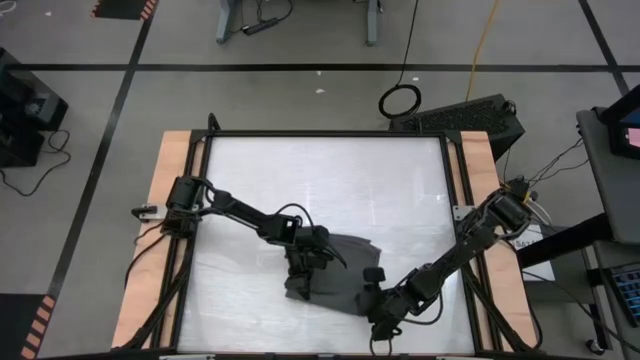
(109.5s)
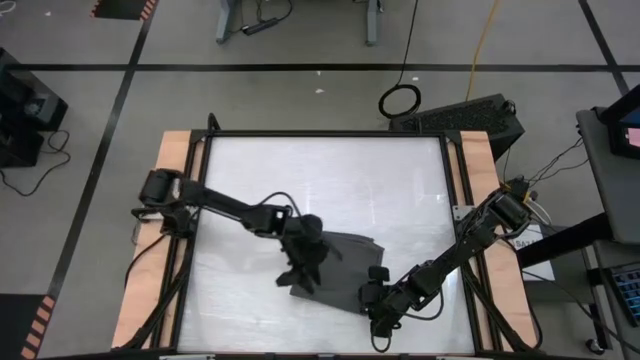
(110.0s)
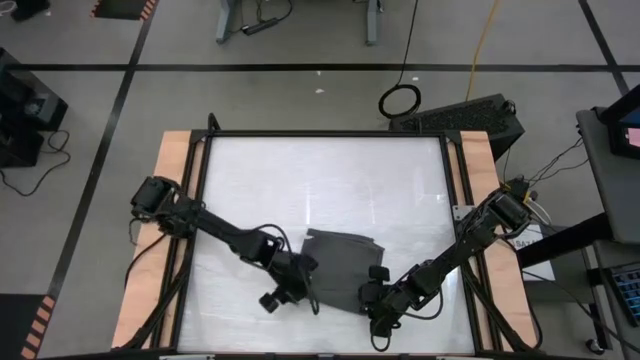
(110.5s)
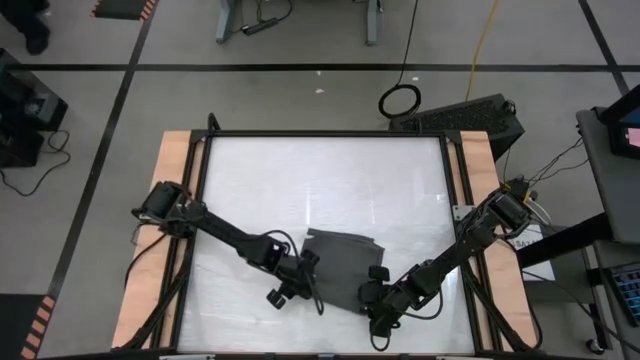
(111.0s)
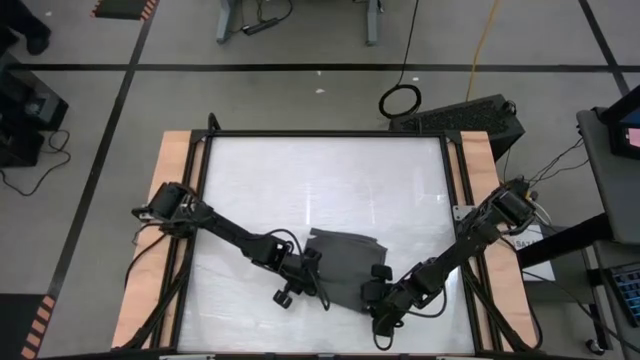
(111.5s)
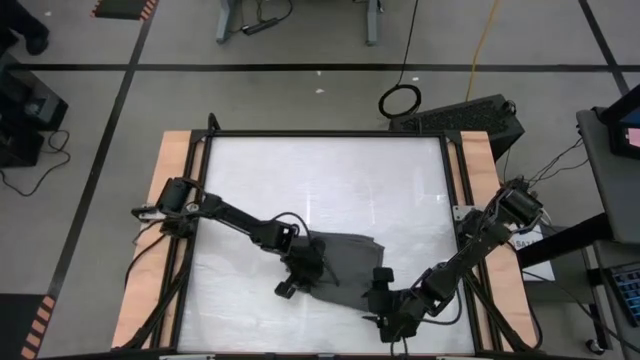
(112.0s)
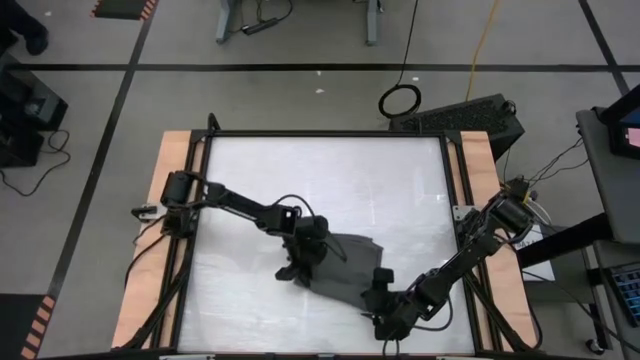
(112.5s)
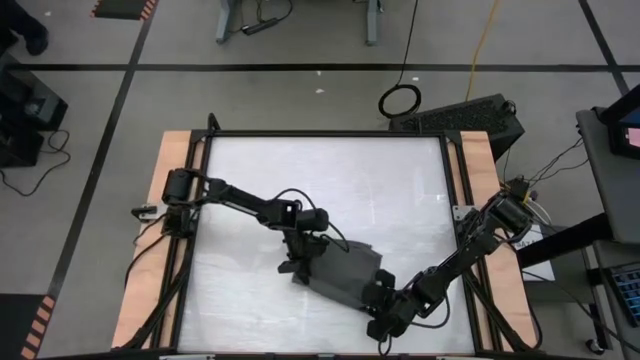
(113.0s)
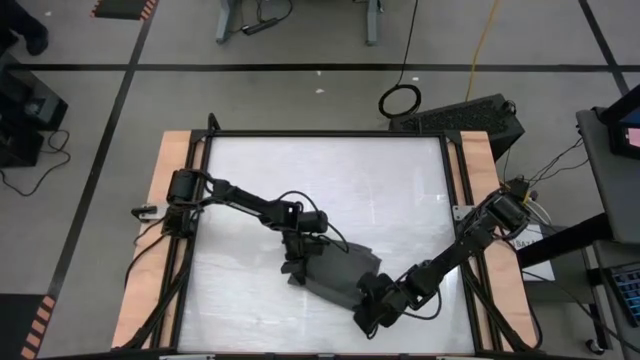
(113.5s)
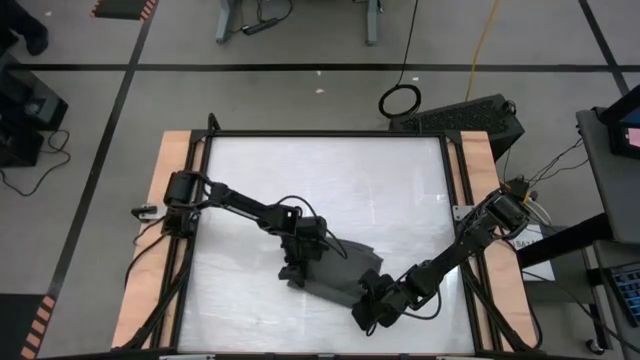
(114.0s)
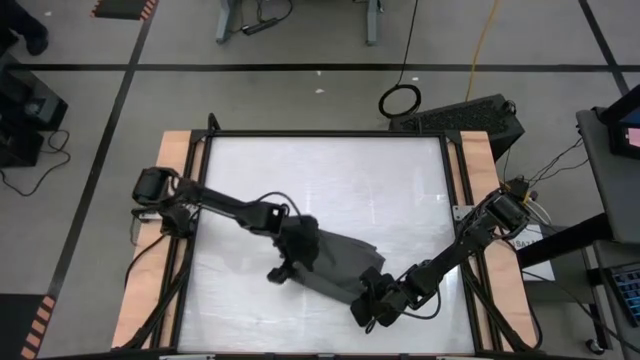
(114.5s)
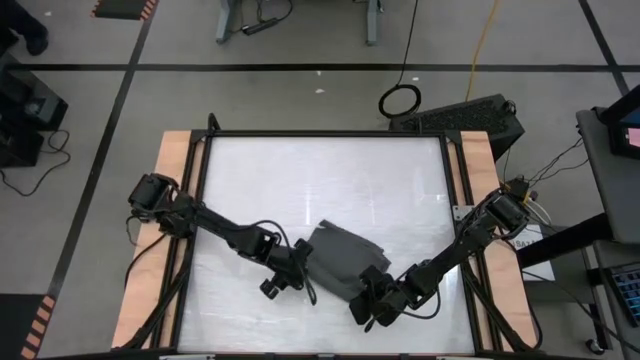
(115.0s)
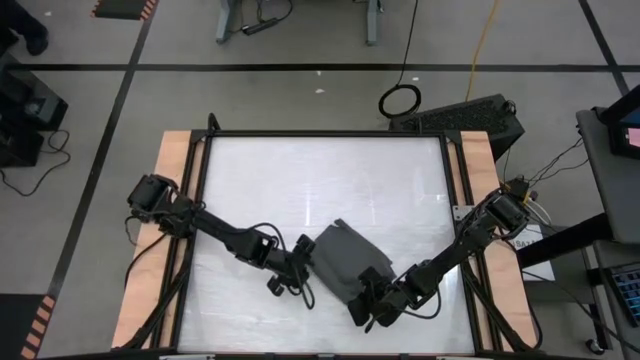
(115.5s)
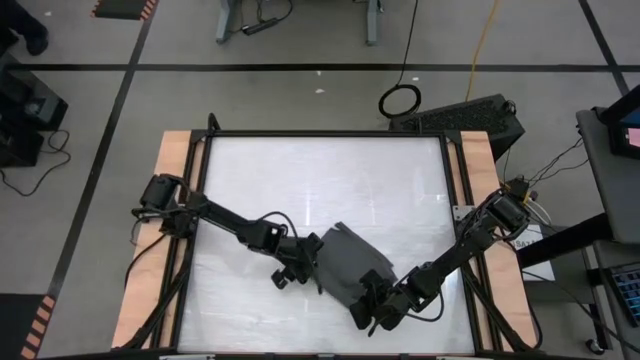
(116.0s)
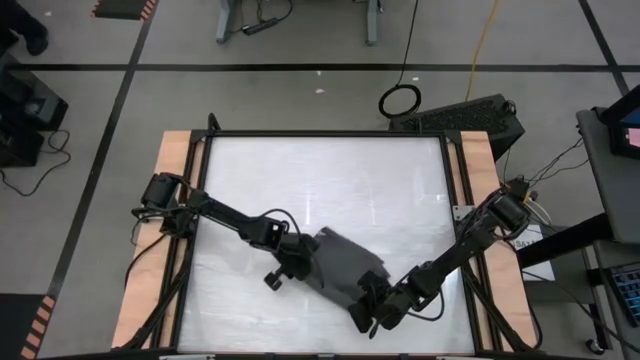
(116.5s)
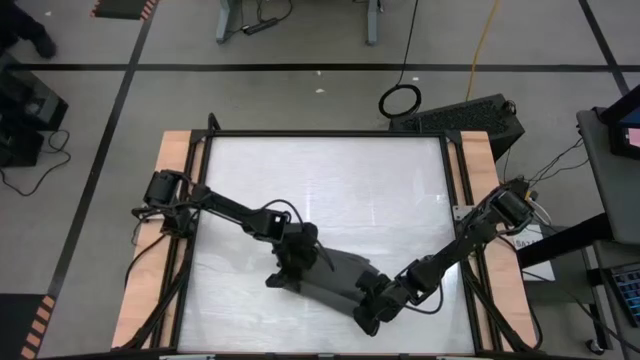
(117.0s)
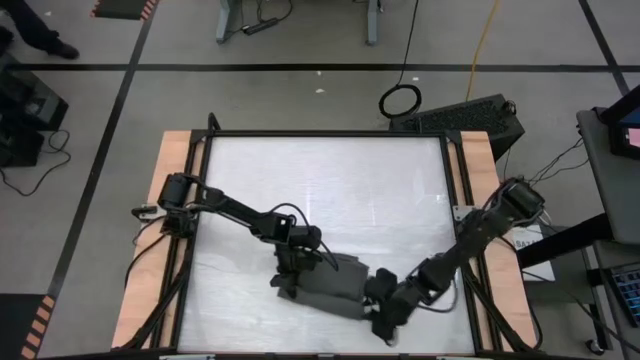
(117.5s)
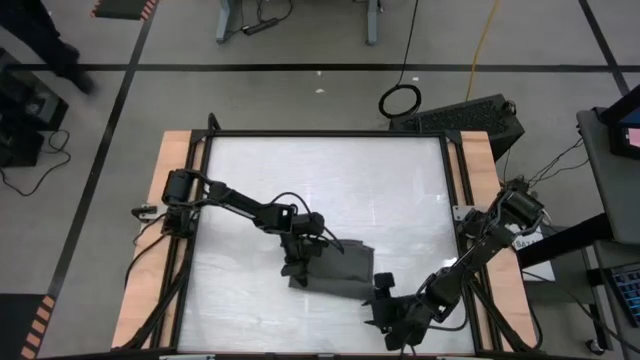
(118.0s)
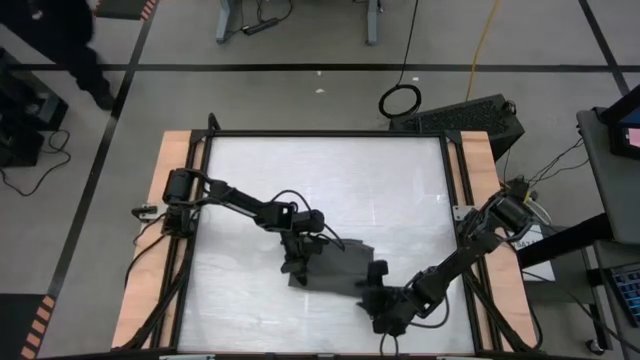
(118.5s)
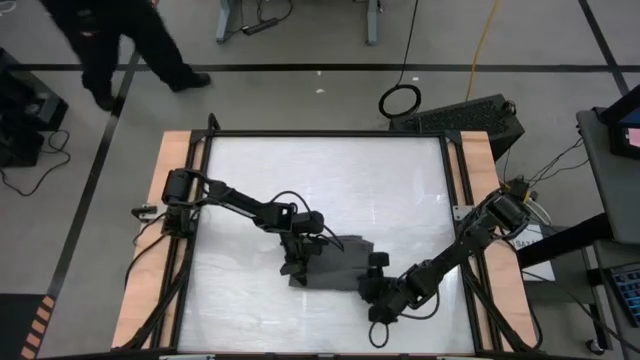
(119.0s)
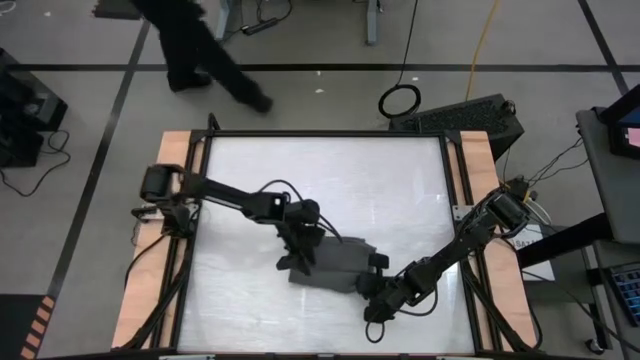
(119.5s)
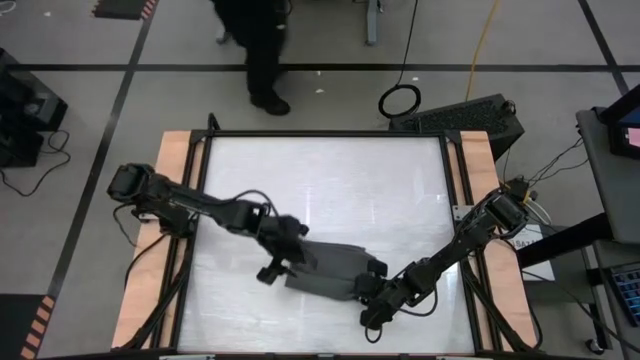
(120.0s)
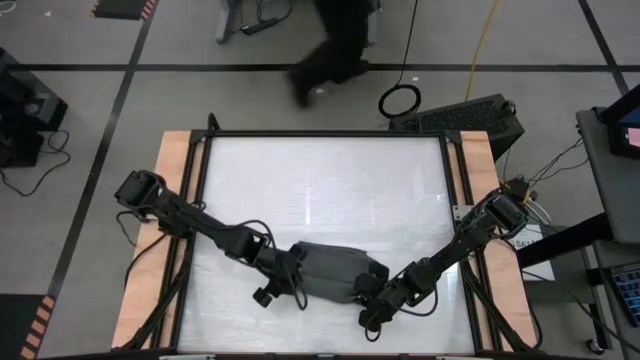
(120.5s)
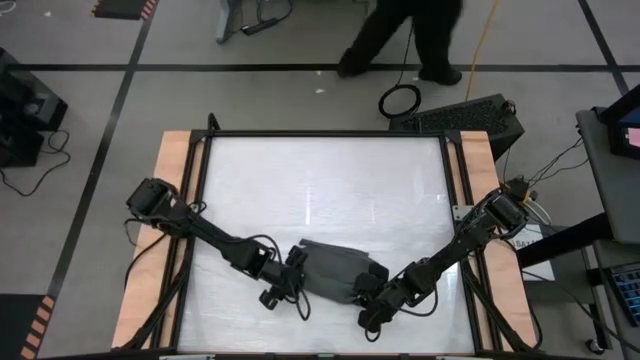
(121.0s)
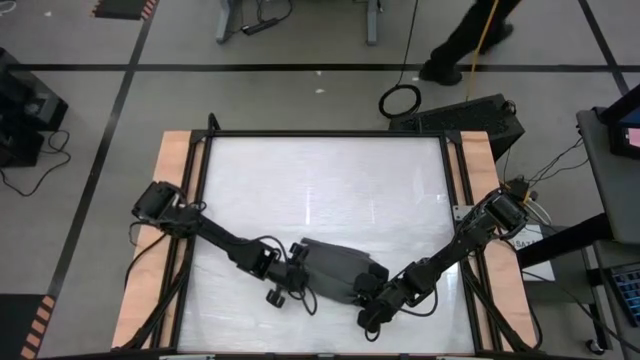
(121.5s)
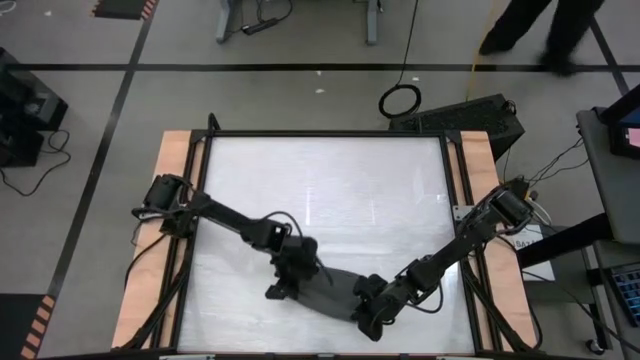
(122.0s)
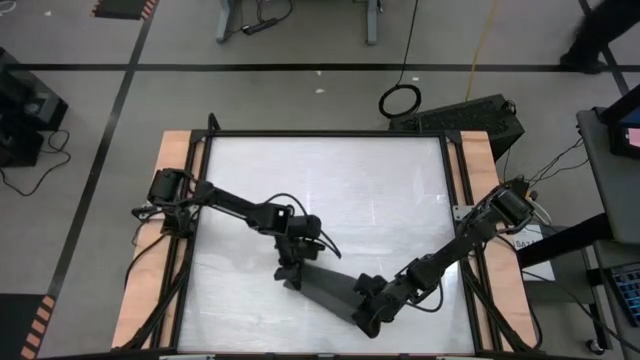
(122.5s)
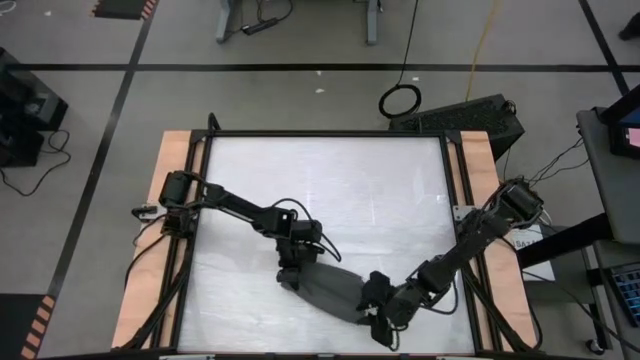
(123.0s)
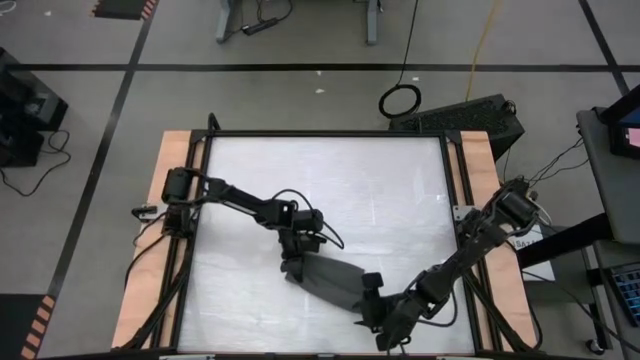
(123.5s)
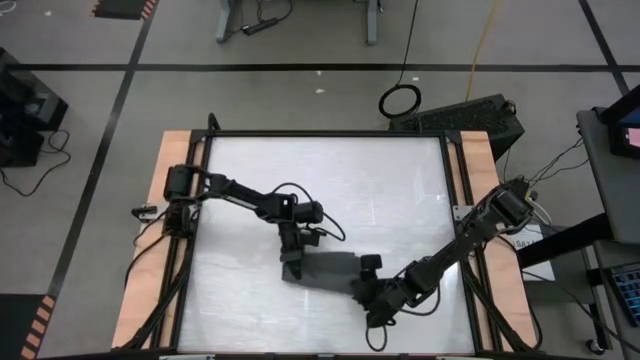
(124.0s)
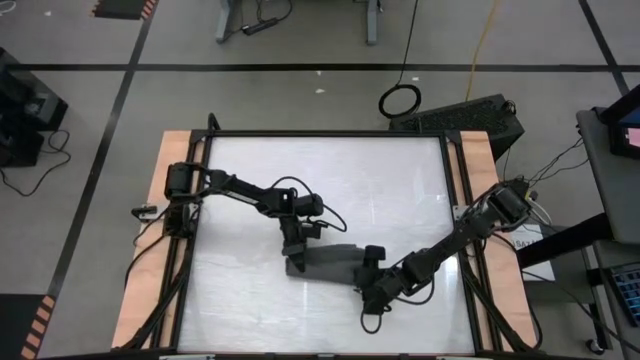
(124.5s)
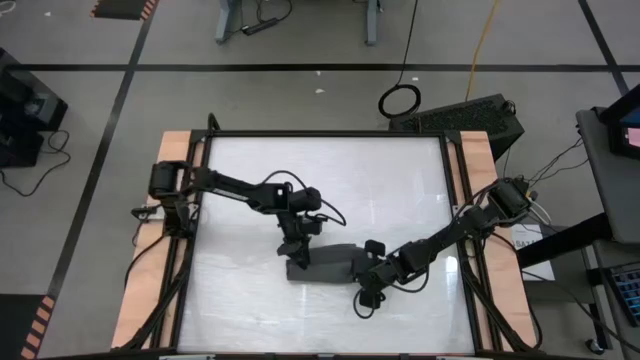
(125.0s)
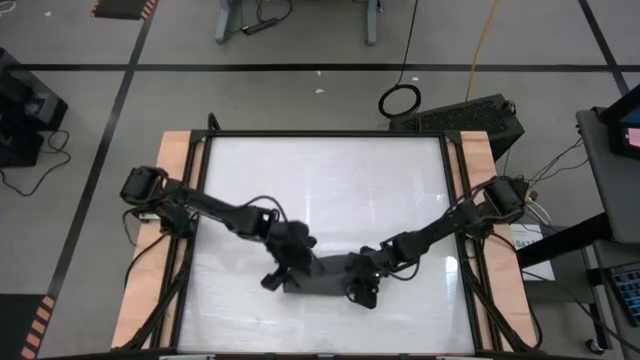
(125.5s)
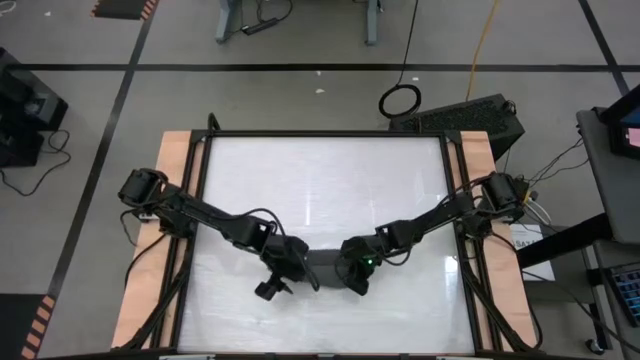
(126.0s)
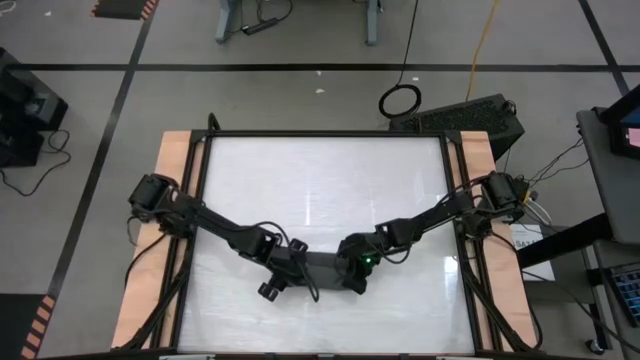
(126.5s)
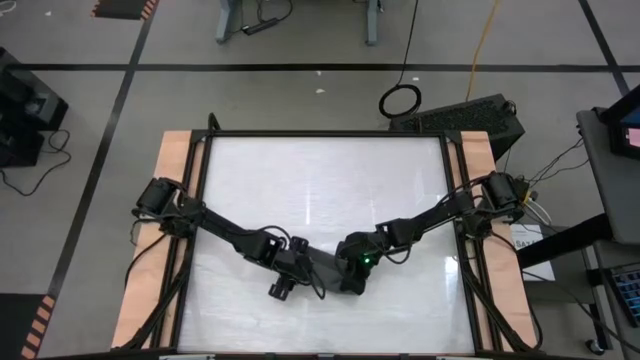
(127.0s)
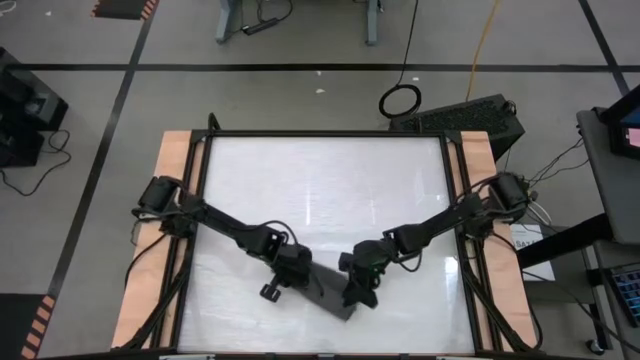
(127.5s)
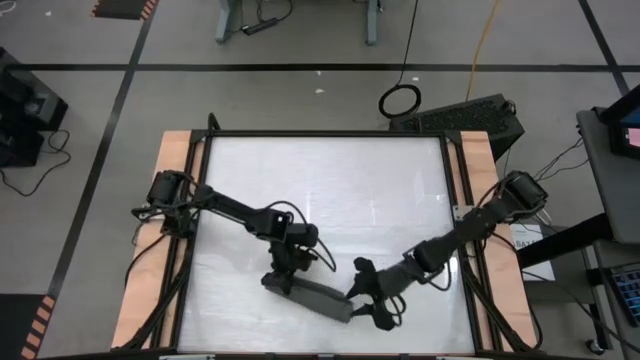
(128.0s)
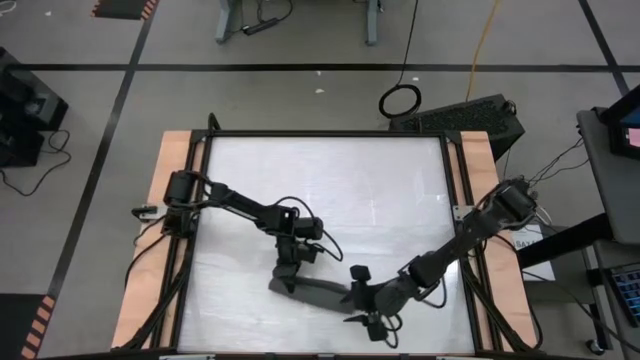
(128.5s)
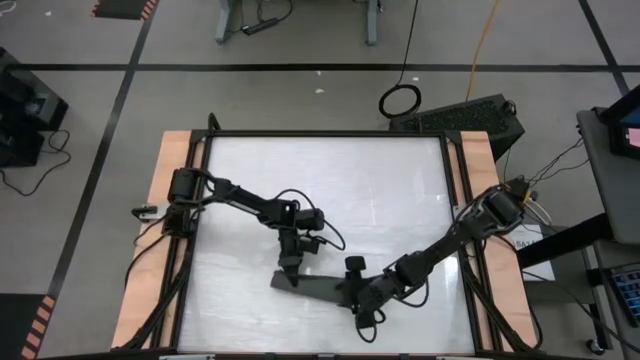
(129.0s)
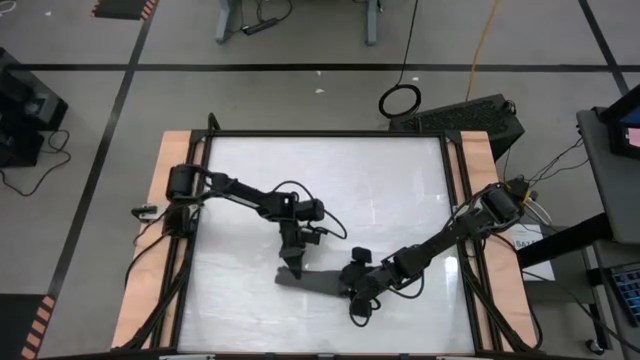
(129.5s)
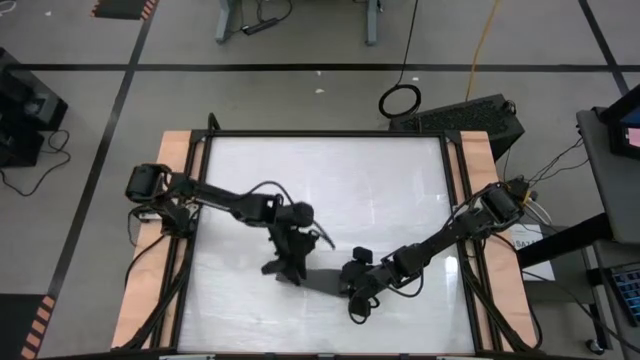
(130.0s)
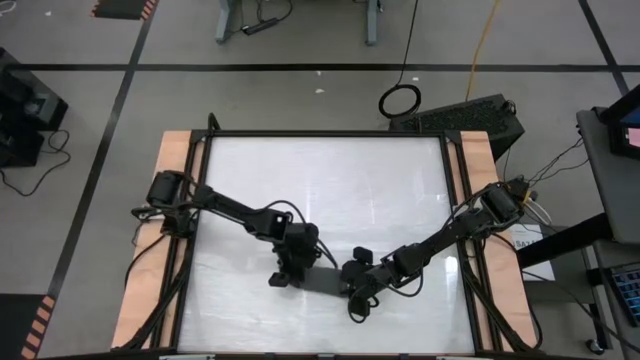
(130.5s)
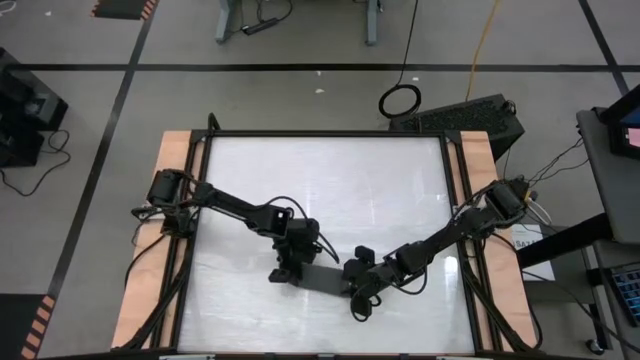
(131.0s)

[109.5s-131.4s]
Task: Roll towel
Roll the dark gray towel
